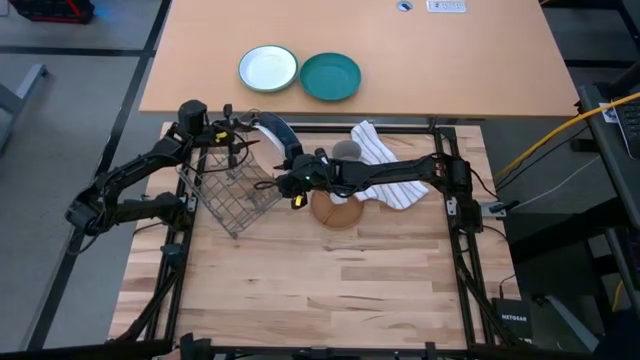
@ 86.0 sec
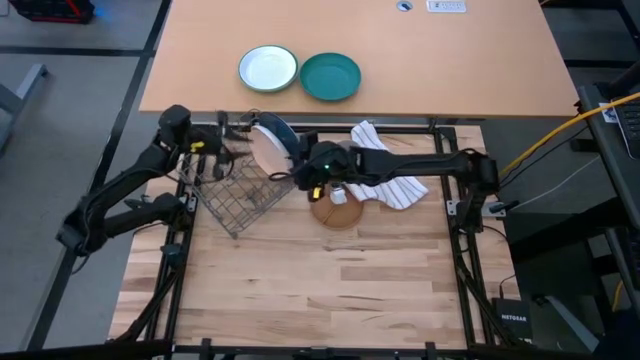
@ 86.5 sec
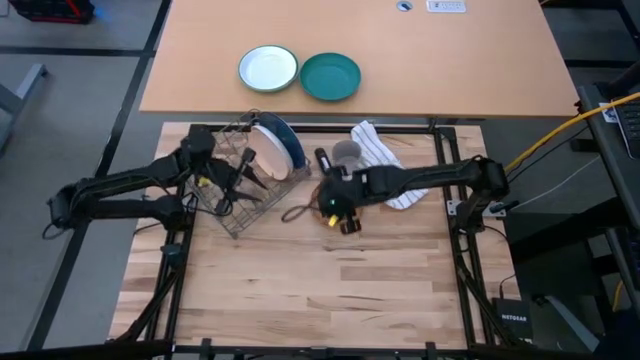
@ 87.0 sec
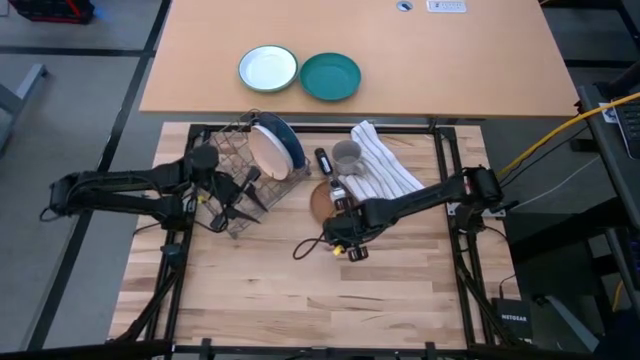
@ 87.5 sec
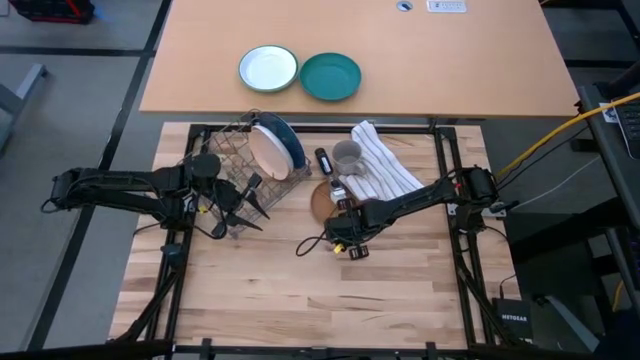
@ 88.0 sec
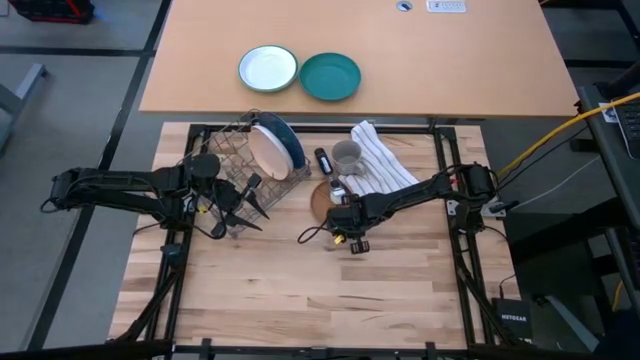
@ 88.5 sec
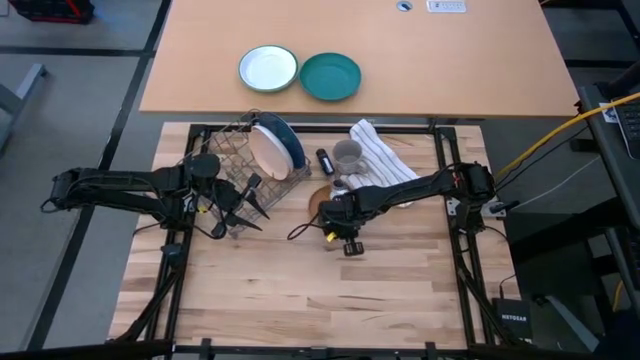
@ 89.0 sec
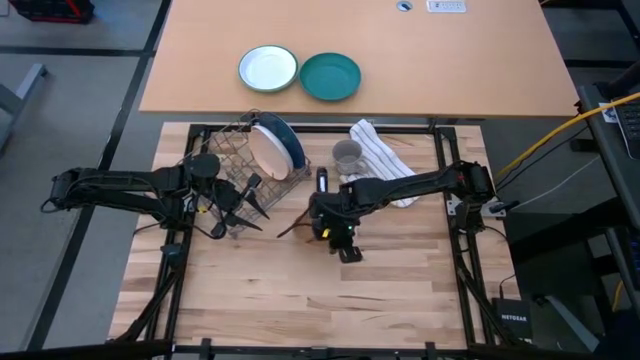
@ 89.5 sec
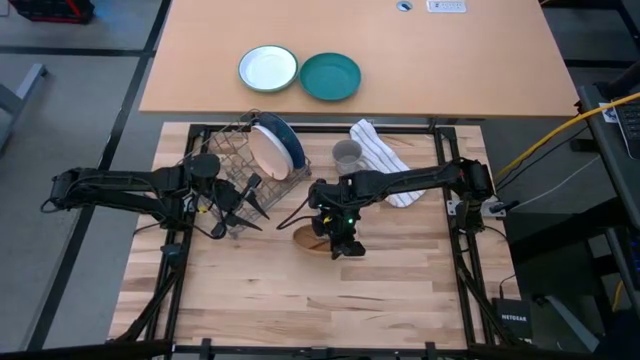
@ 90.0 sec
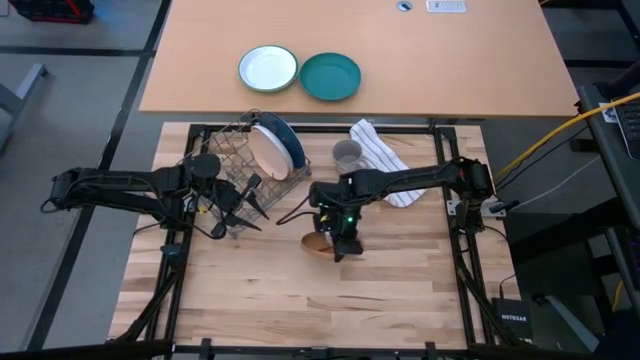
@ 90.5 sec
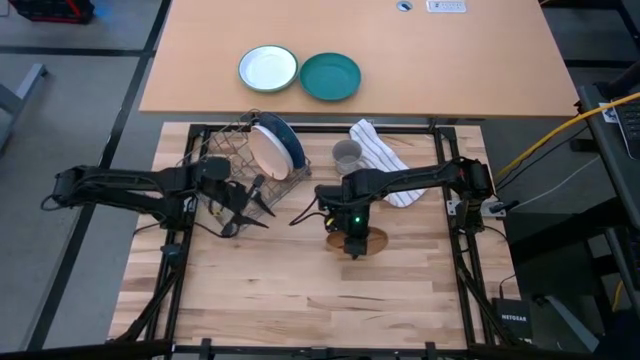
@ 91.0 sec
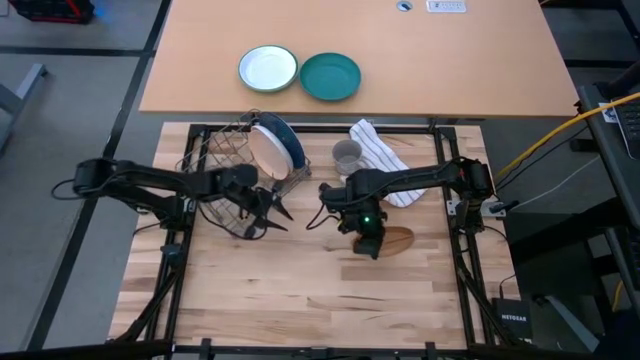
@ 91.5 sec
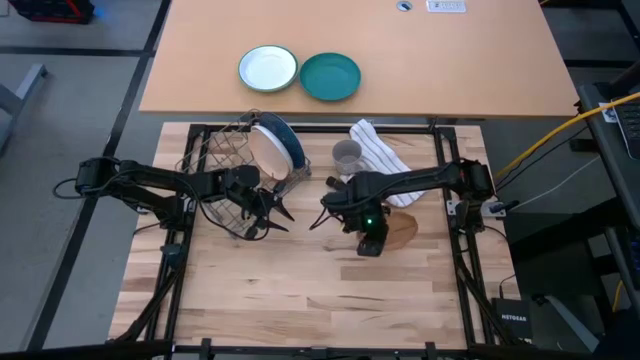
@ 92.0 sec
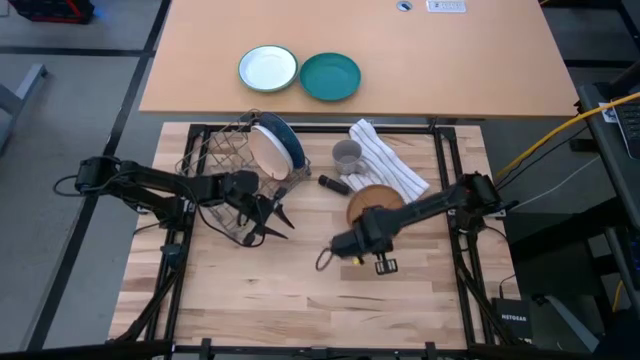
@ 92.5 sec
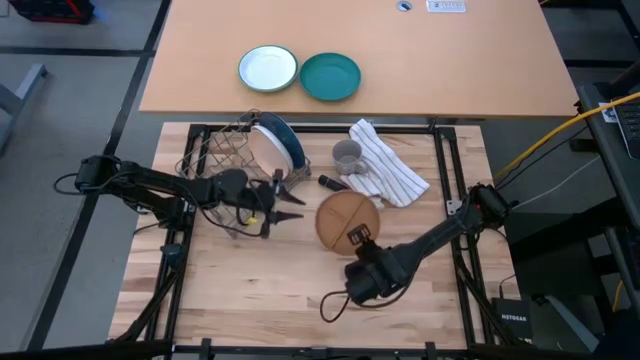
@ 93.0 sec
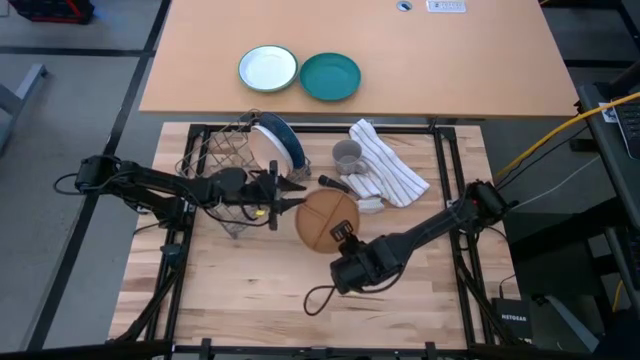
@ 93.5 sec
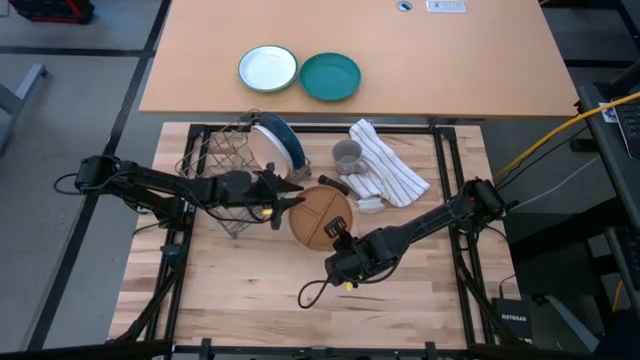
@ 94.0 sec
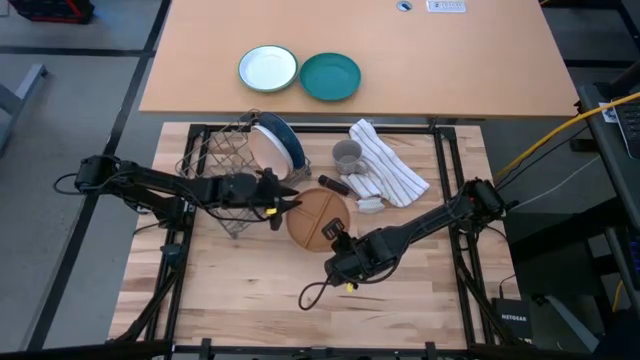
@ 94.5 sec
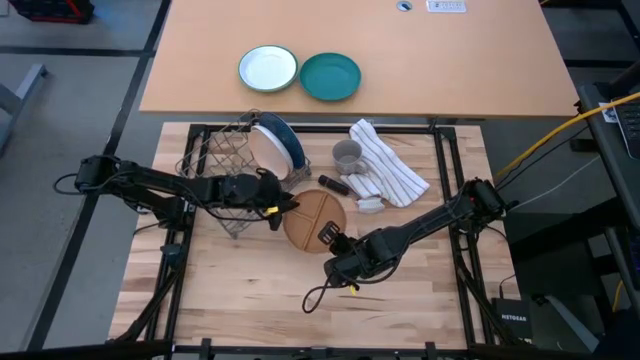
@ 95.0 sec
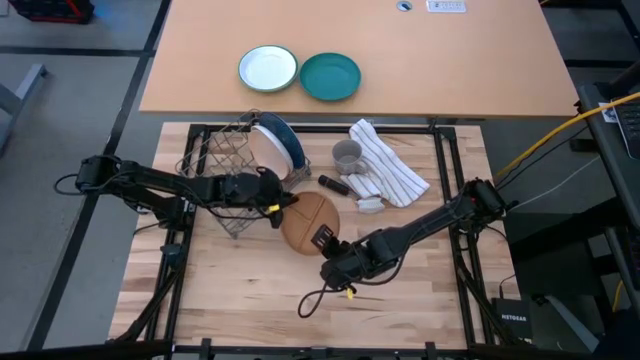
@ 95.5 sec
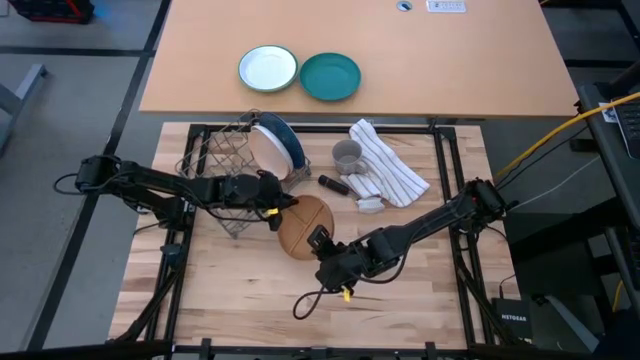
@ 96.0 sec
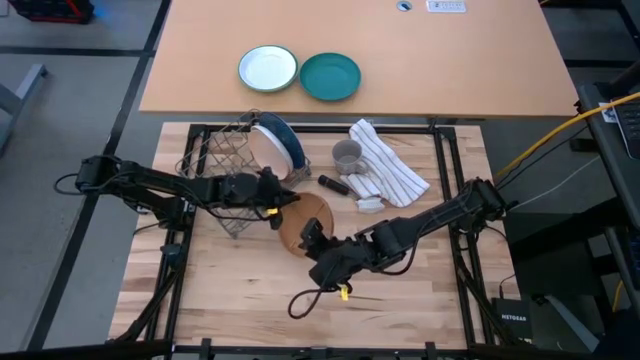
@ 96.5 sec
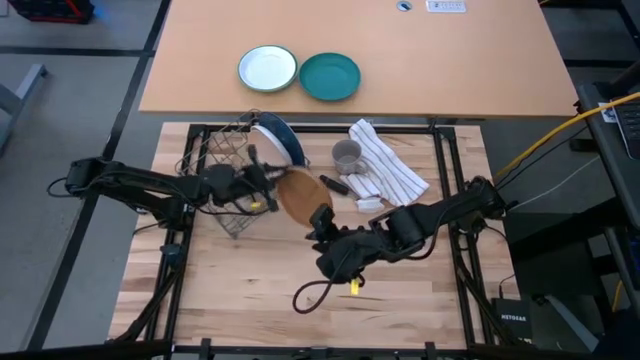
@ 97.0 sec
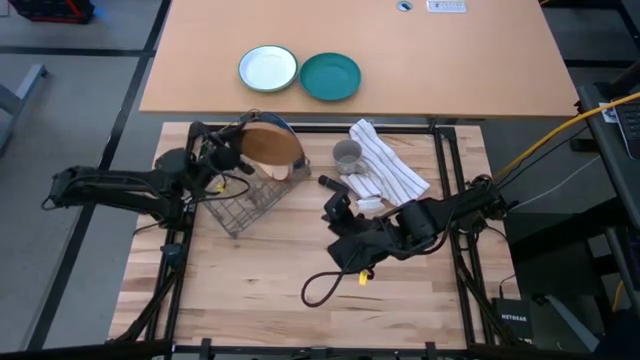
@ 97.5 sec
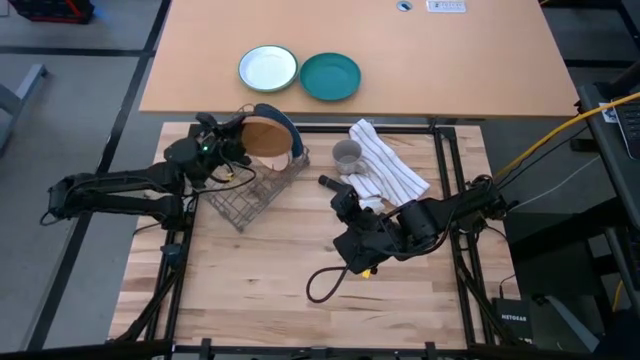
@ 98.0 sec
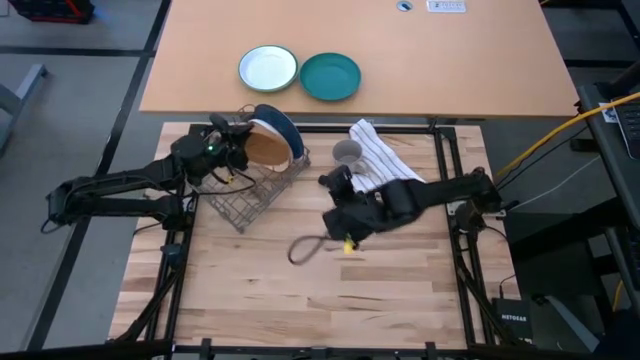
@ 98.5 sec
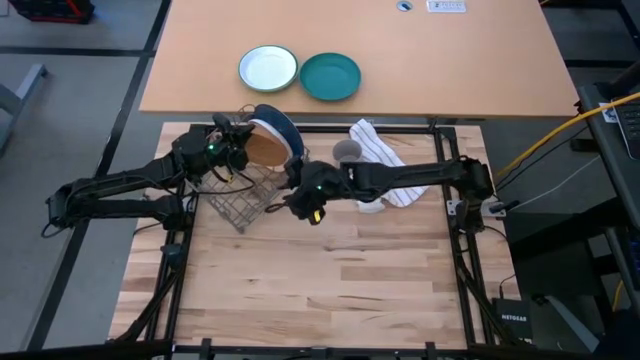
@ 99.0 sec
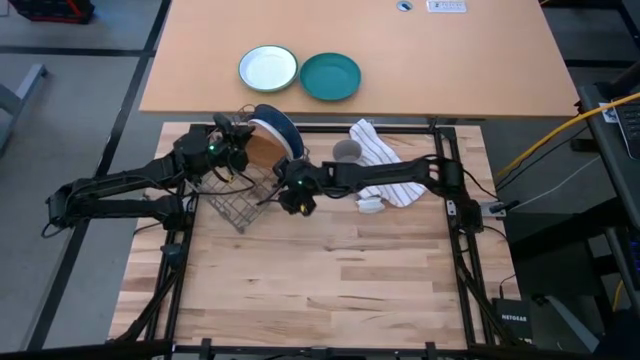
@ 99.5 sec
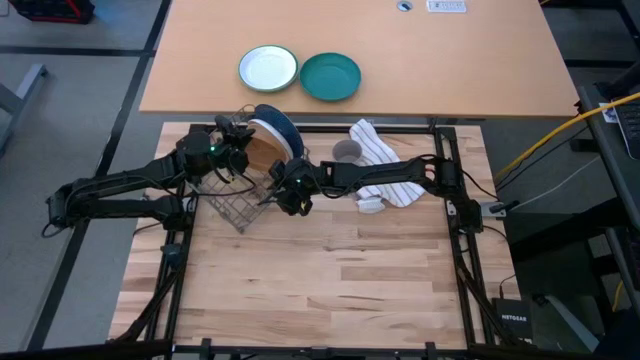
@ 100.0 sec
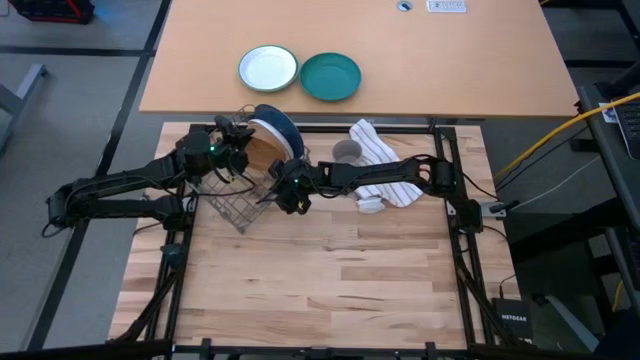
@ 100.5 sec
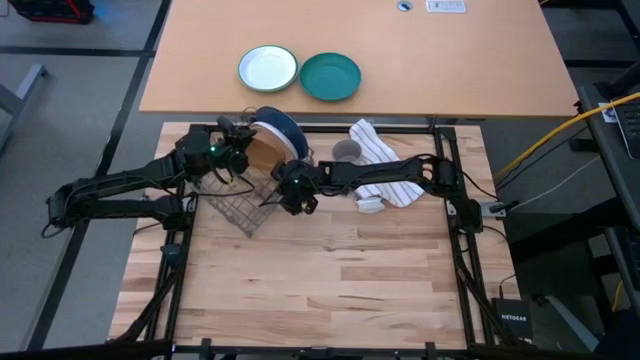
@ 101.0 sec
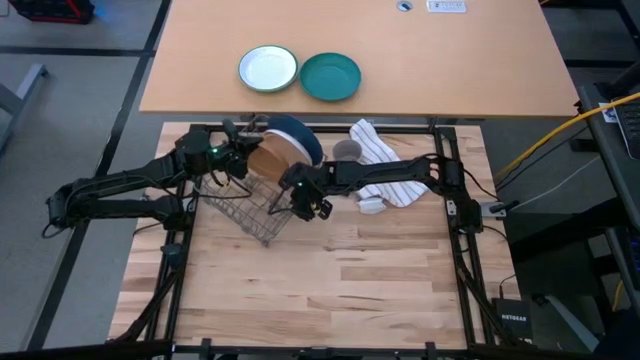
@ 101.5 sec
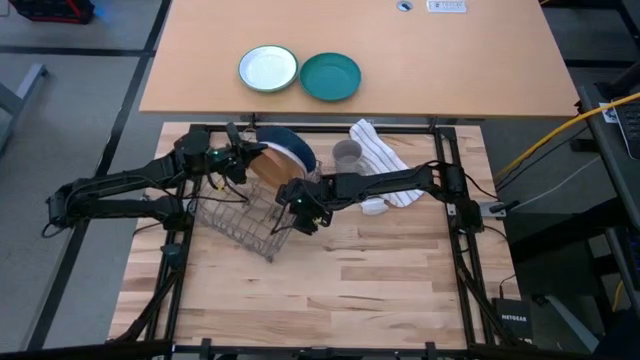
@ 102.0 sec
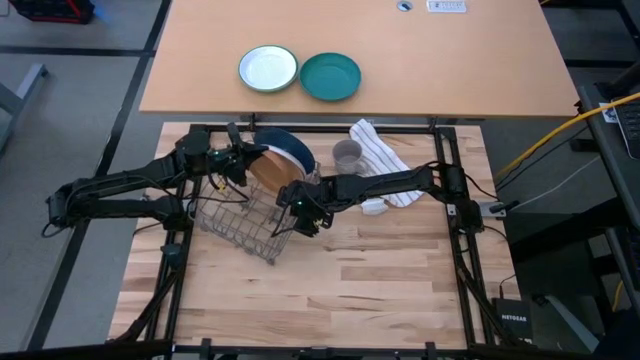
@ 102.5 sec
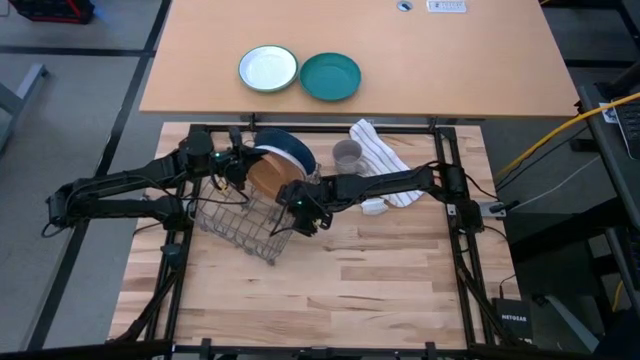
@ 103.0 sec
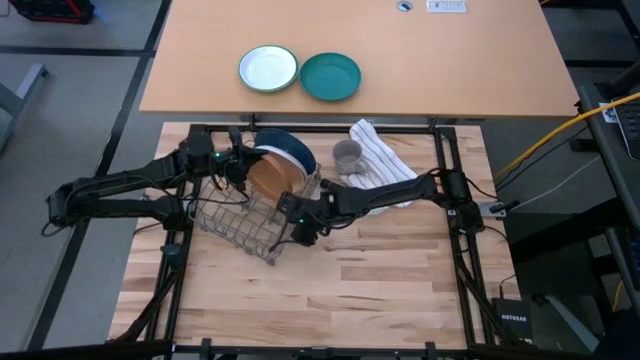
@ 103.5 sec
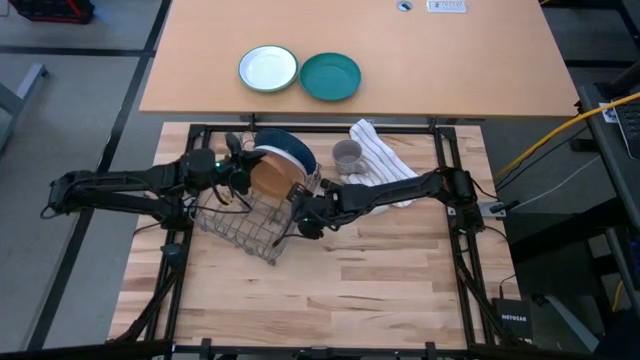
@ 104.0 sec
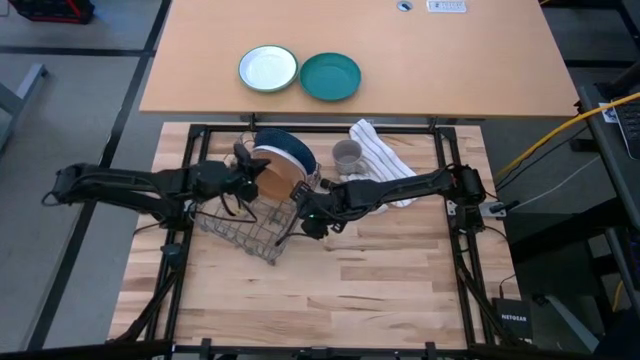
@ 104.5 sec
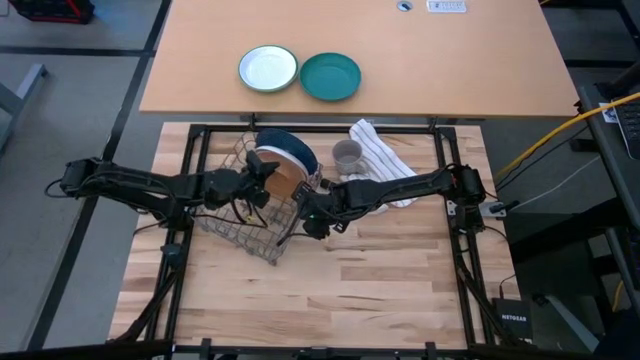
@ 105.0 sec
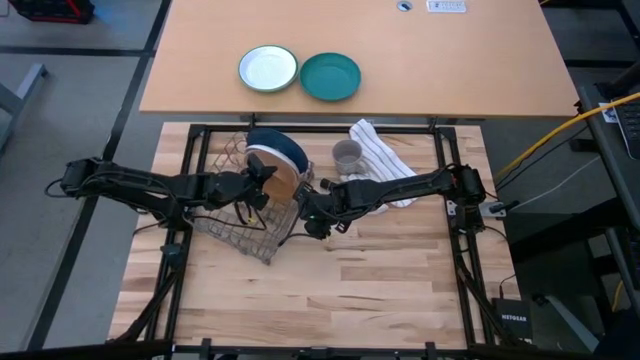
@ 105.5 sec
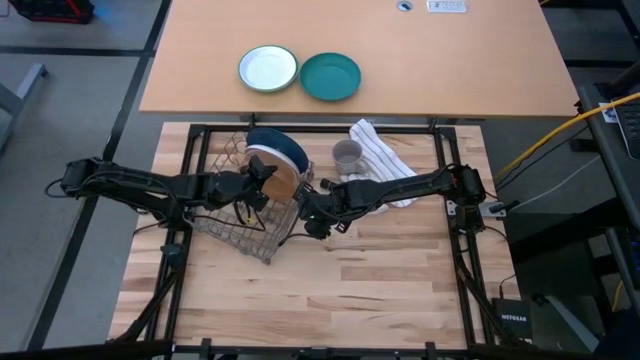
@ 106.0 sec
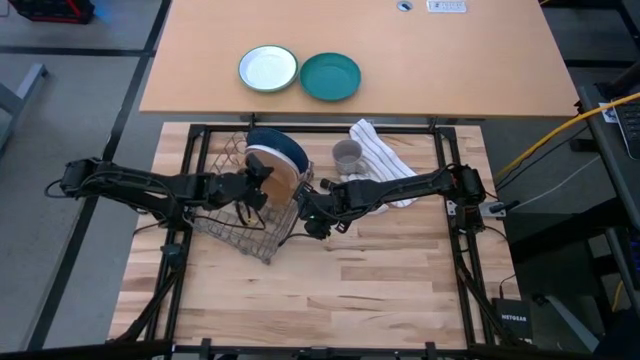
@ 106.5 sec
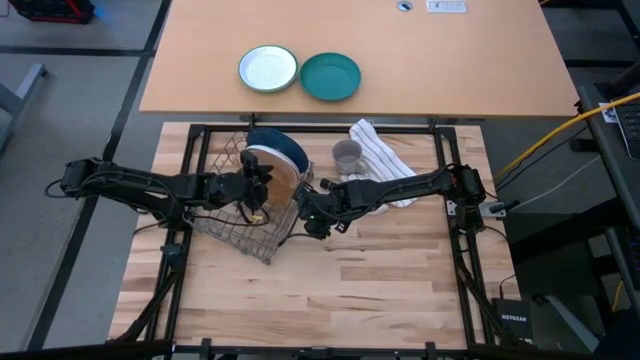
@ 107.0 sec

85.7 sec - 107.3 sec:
Task: Sort dishes
Put the brown plate into the dish rack
